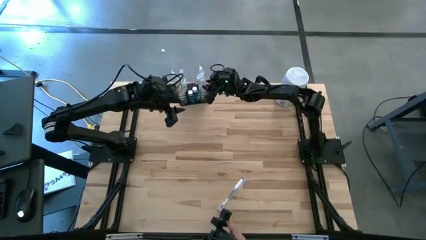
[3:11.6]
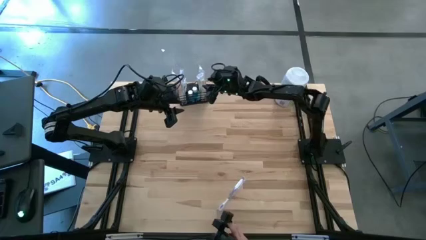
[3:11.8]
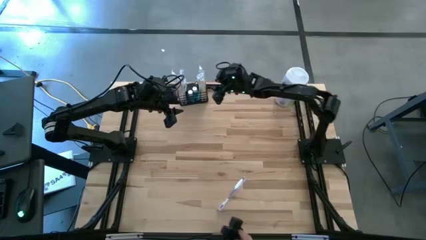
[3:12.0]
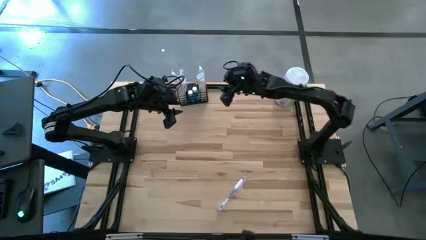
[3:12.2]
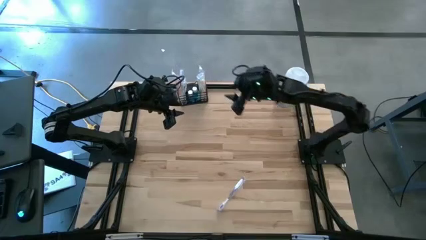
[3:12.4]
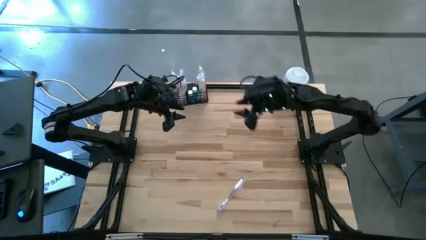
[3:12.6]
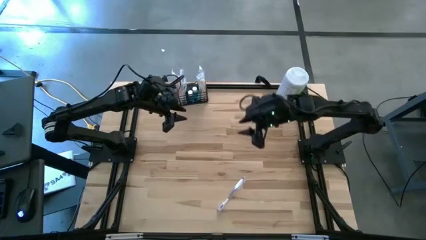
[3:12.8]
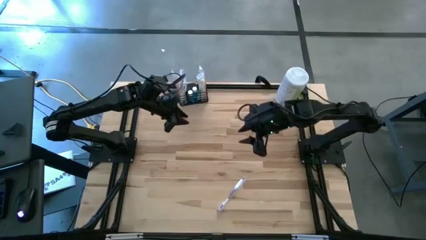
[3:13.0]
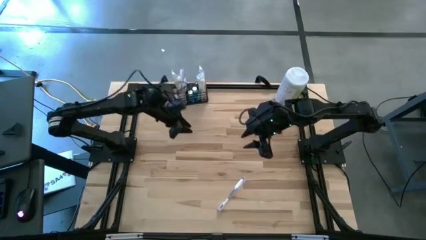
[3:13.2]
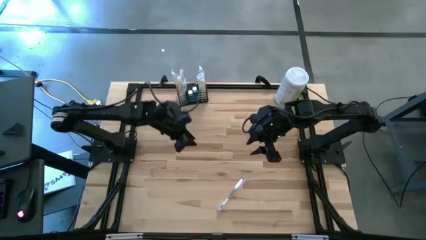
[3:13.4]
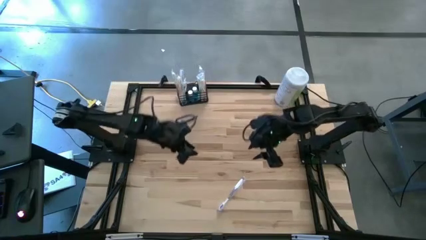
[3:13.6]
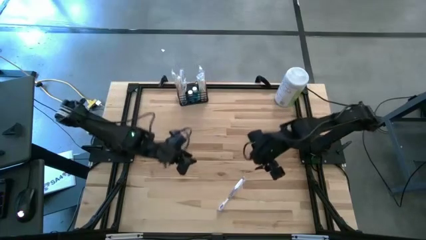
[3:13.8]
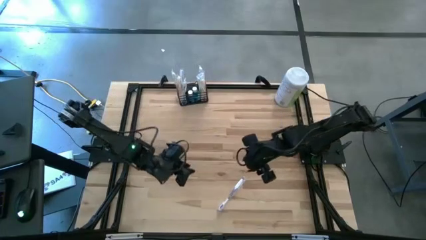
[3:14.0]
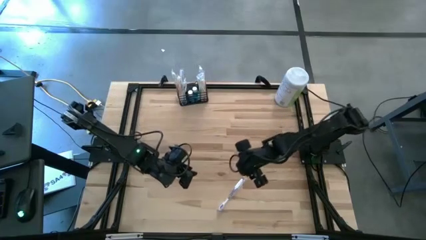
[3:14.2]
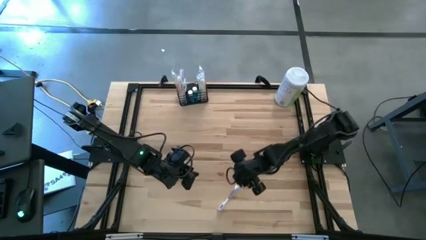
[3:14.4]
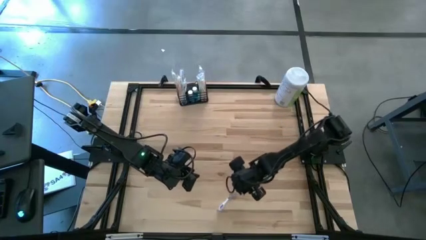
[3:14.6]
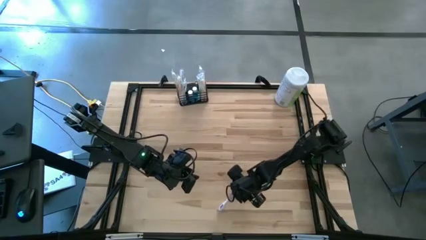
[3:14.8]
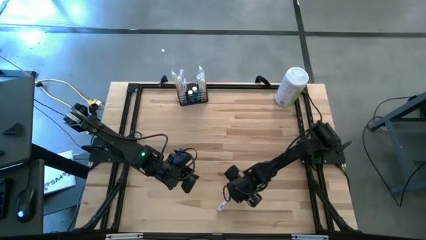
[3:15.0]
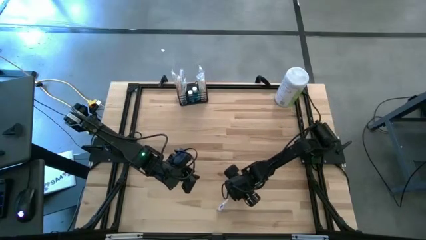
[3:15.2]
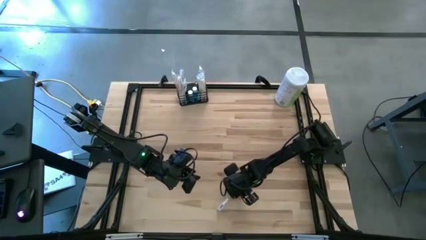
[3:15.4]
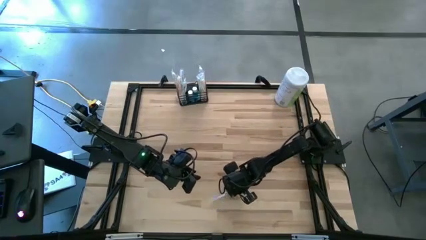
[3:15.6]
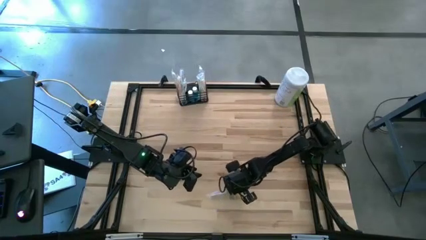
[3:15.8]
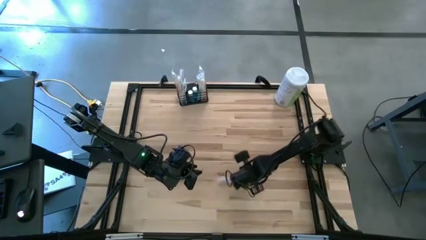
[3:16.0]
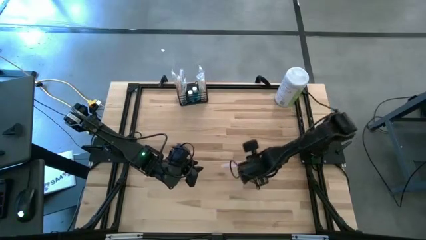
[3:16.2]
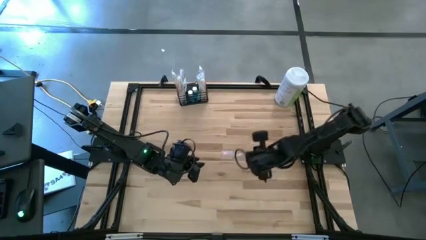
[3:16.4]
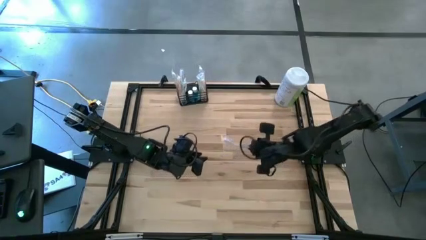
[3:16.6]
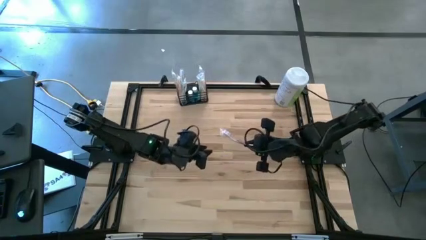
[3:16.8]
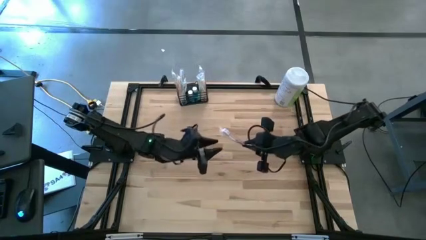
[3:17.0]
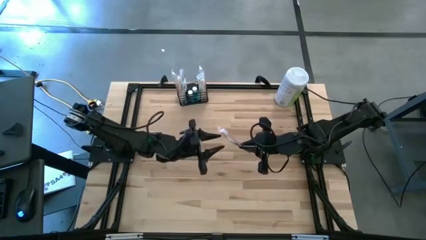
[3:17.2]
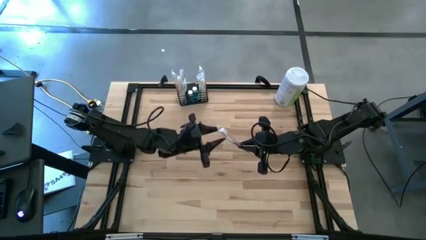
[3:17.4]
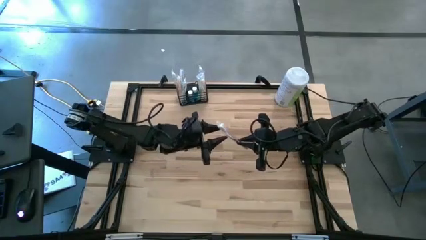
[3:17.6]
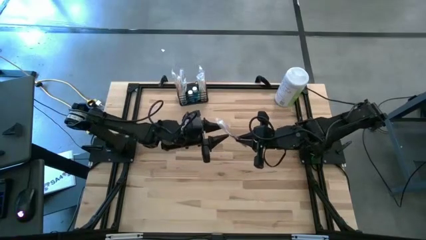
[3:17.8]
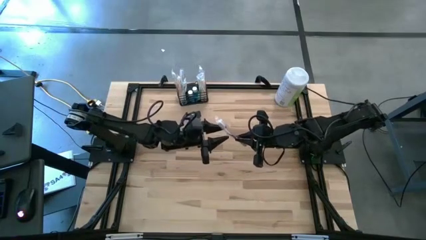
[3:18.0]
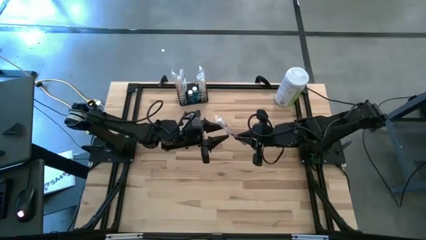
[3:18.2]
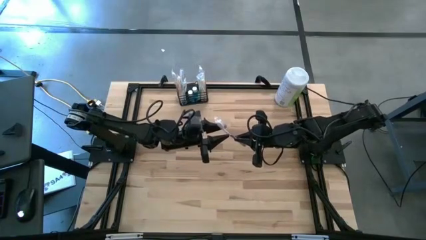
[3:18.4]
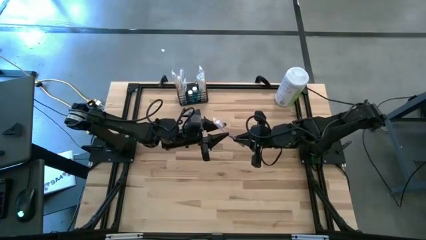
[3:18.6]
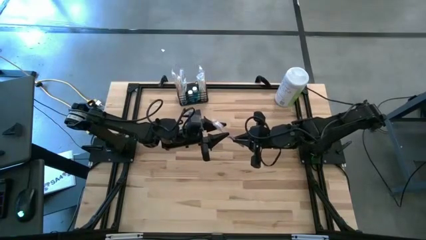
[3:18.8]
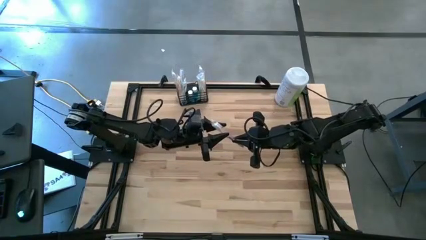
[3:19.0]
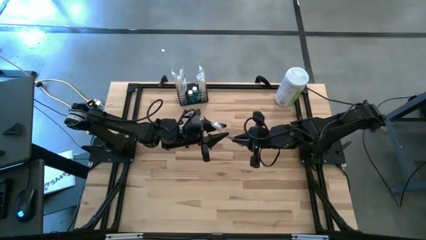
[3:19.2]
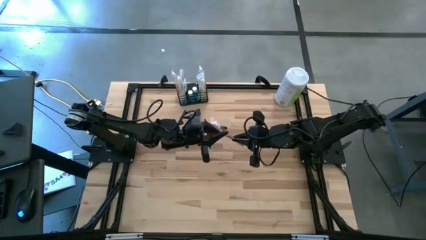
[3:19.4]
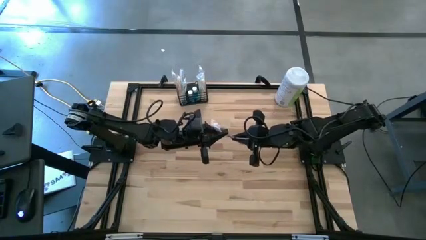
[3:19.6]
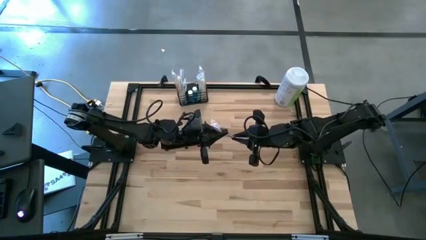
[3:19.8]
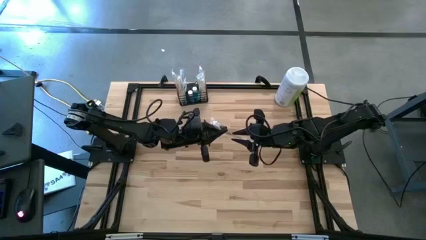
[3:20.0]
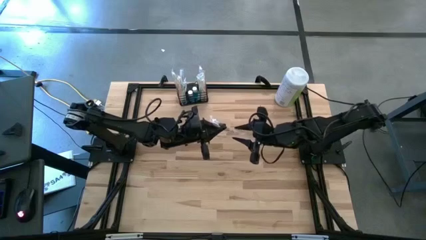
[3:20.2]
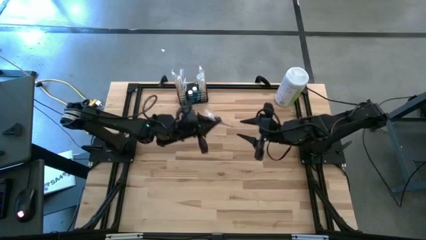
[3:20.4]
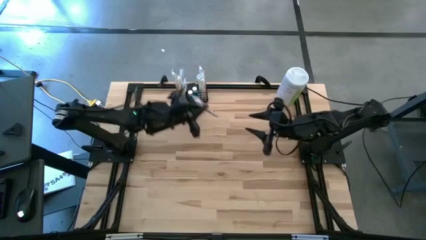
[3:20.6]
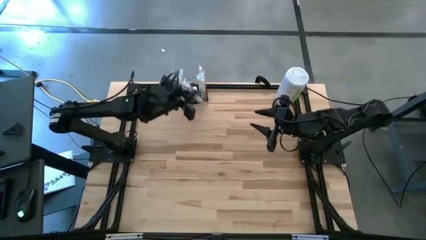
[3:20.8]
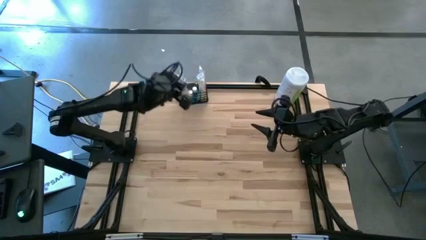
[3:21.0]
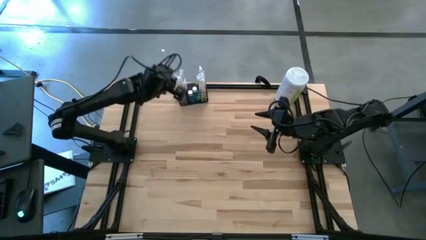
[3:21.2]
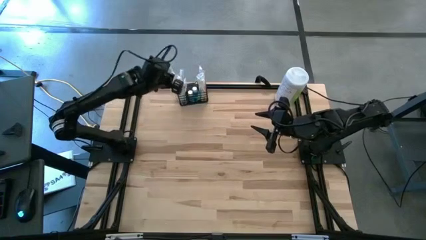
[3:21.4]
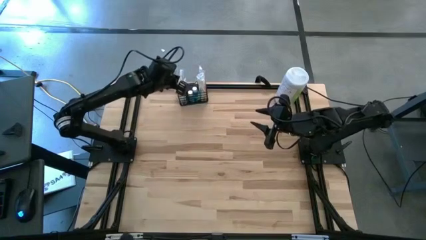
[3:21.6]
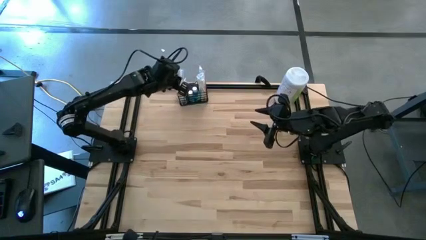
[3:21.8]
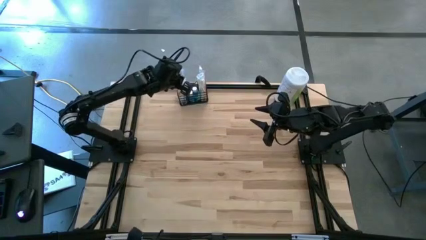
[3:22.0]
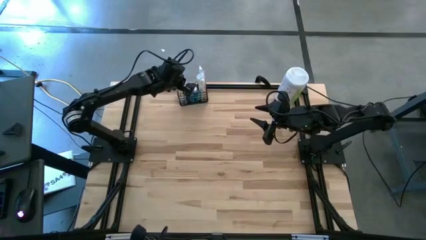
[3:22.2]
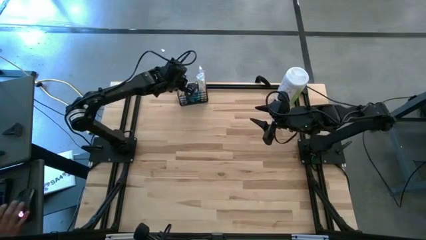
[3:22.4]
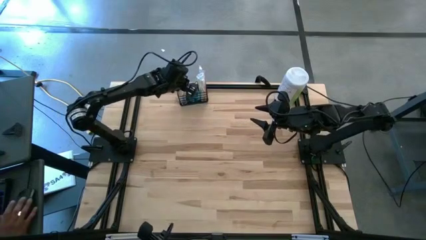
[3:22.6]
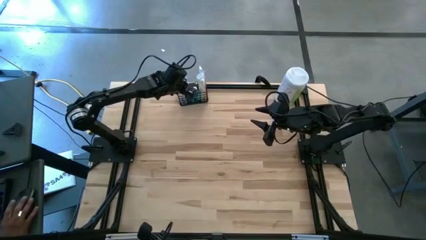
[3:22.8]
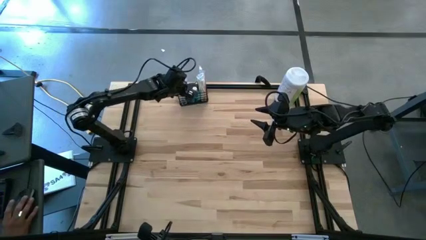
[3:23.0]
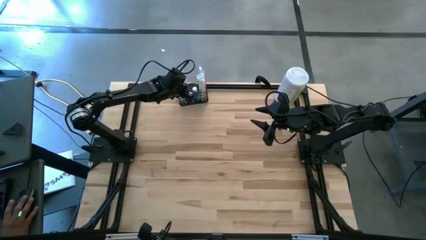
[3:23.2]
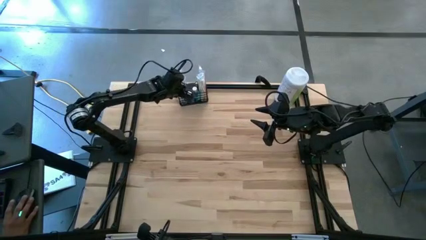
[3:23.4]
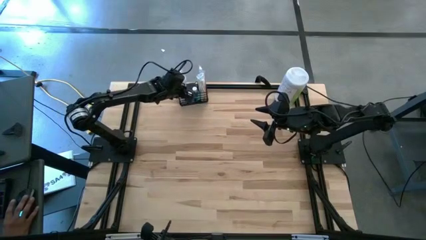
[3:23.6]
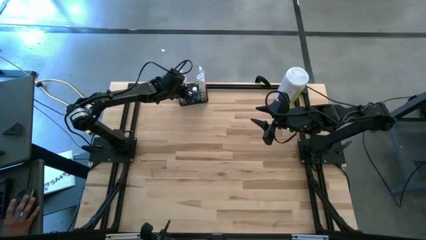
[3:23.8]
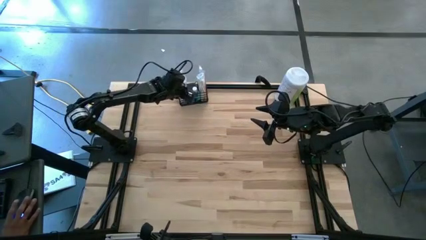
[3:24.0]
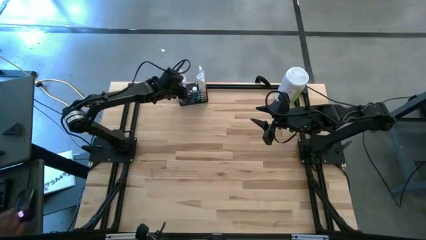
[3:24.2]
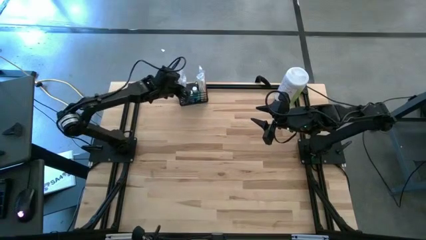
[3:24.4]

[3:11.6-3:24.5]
Task: Pick & Place toothbrushing station
Put the violet toothbrush into the black wire organizer

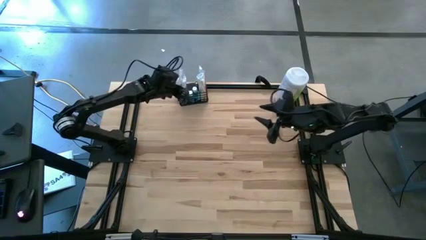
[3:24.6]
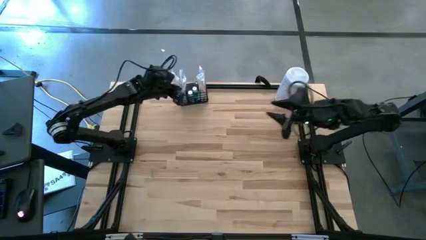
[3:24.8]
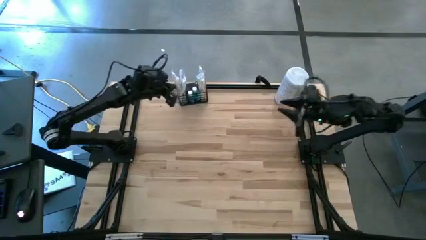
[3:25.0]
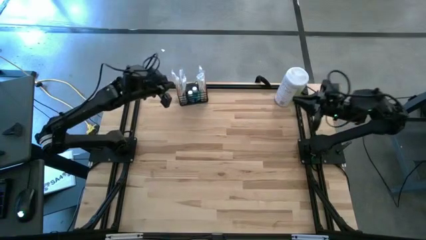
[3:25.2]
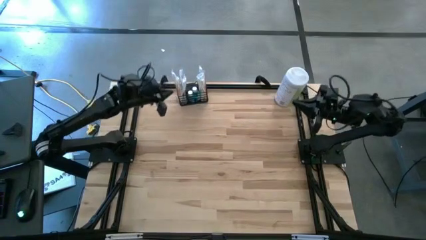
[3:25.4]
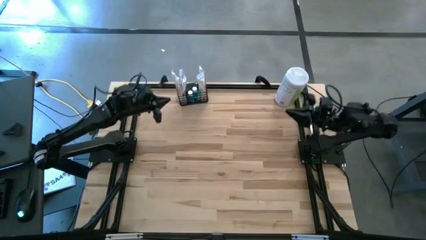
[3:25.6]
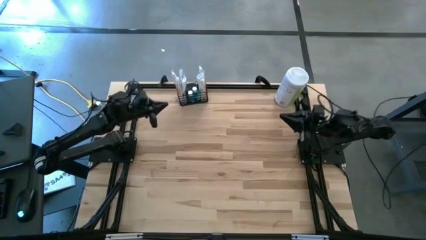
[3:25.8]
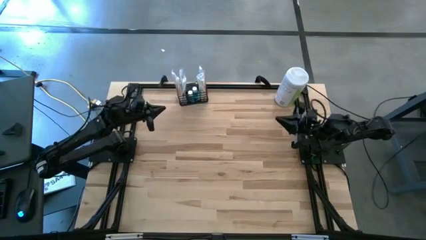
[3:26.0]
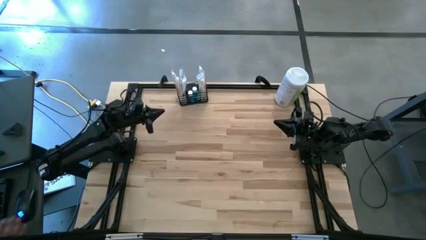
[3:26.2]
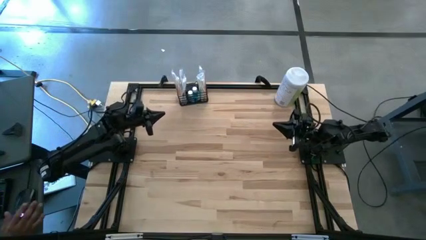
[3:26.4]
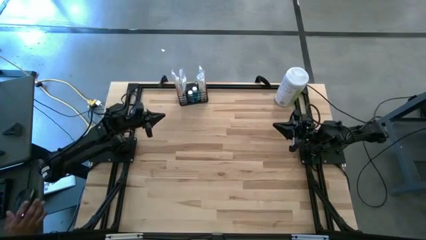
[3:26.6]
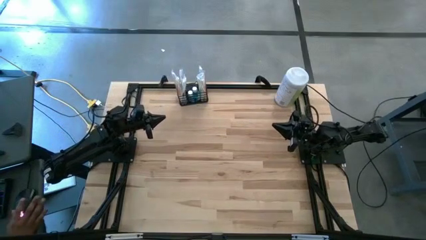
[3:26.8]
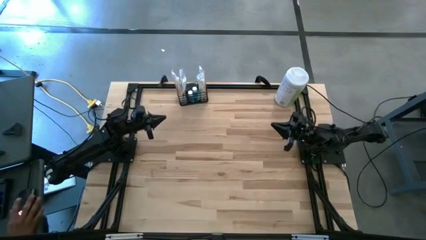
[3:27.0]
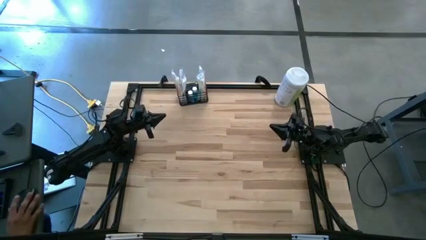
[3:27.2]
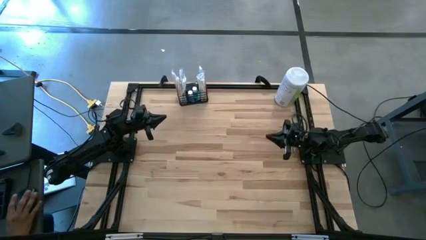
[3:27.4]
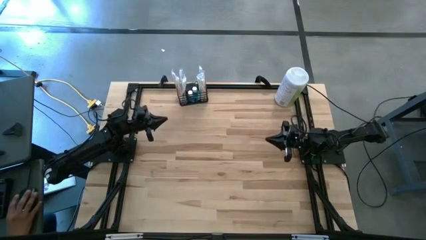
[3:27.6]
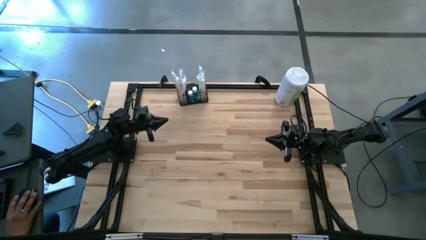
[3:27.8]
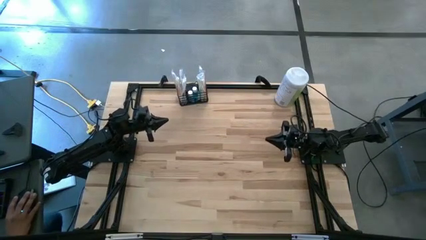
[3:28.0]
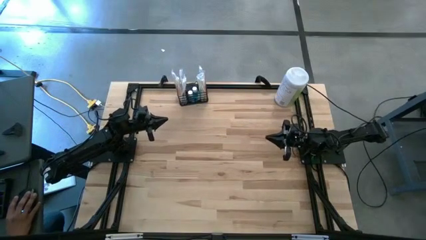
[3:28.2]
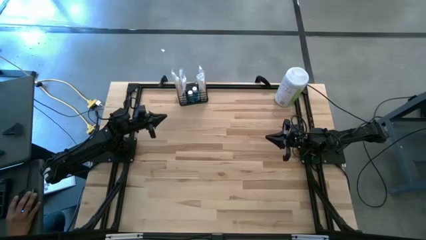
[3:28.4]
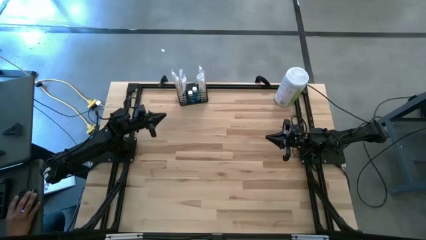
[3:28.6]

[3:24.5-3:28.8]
Return to Home Position
